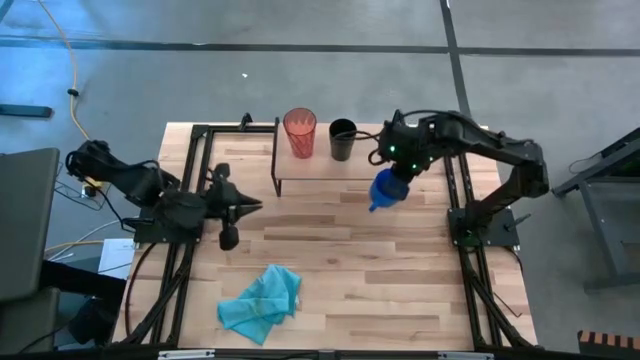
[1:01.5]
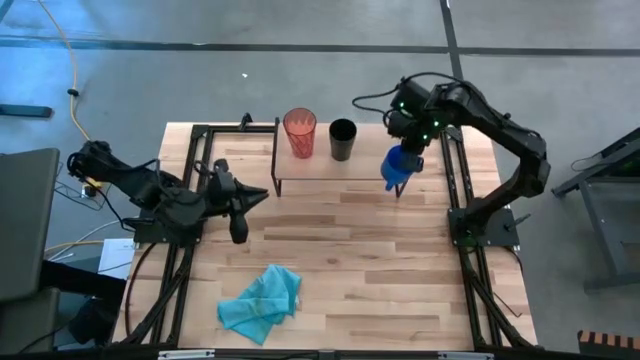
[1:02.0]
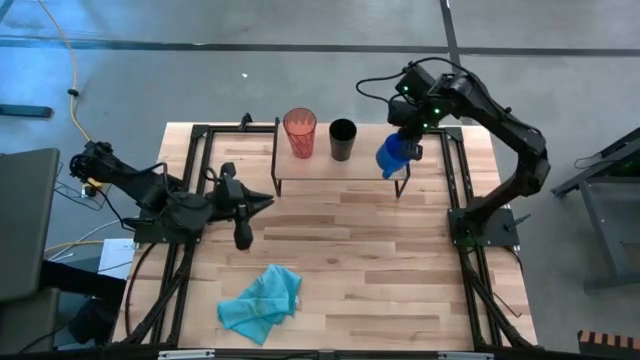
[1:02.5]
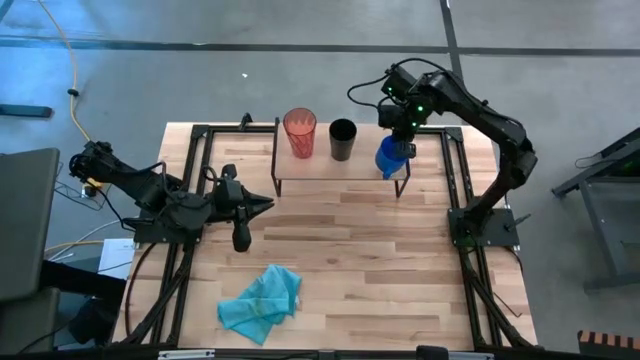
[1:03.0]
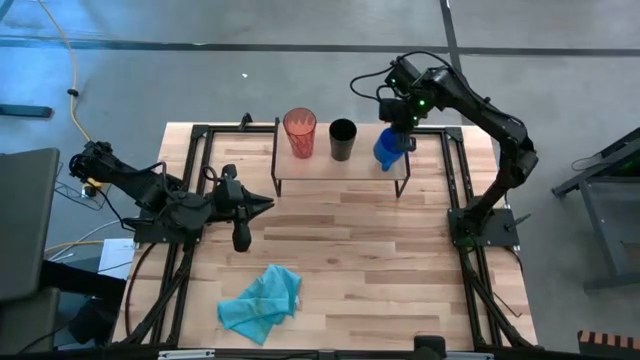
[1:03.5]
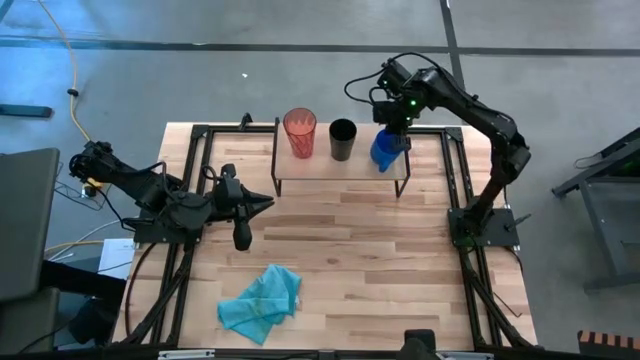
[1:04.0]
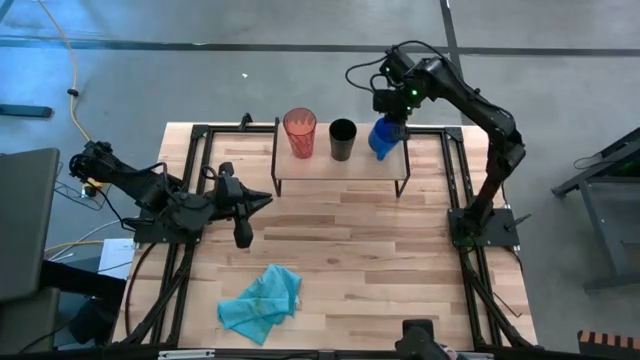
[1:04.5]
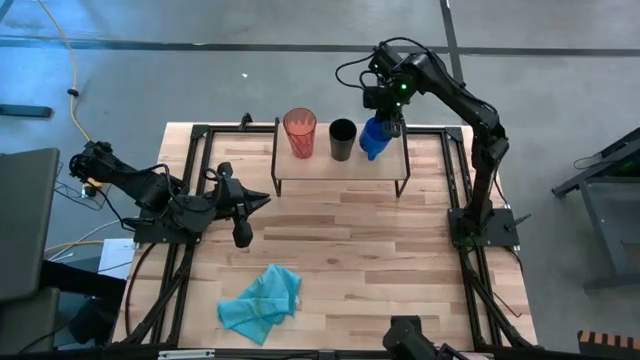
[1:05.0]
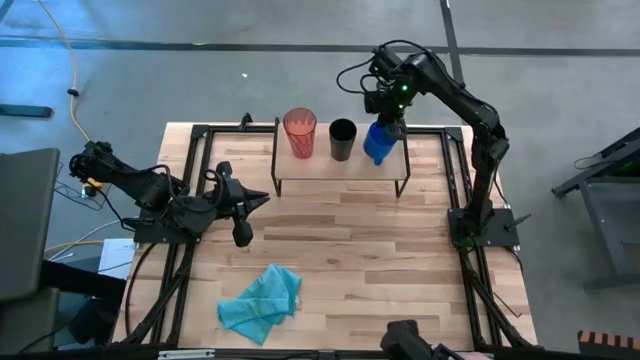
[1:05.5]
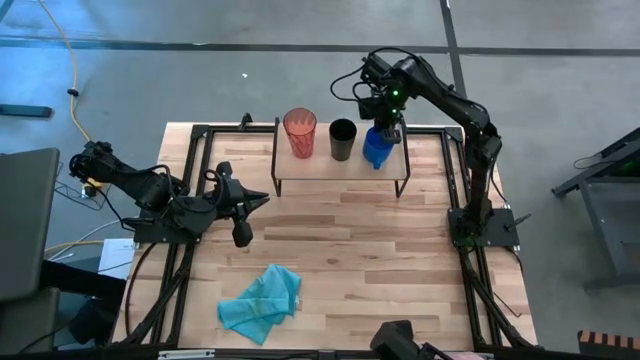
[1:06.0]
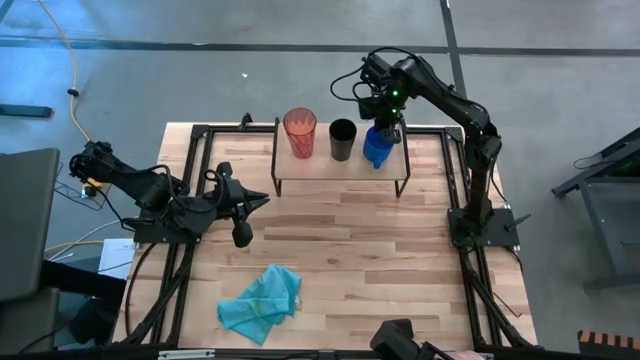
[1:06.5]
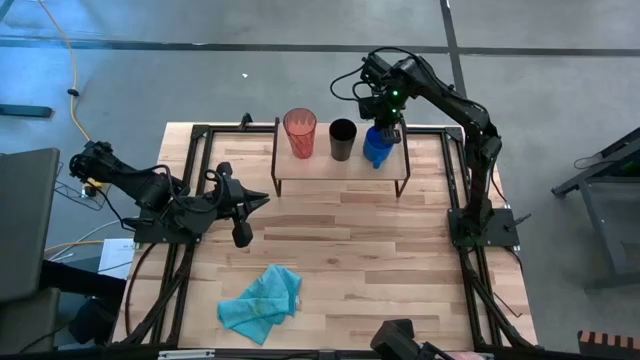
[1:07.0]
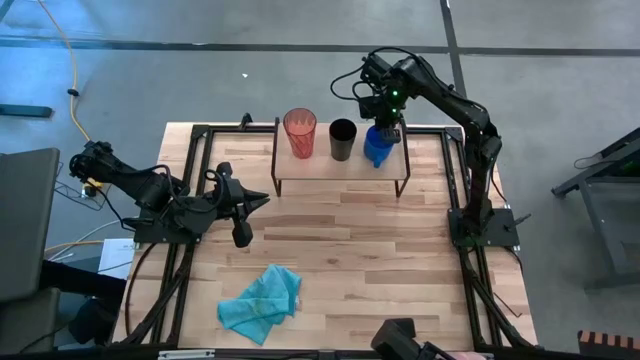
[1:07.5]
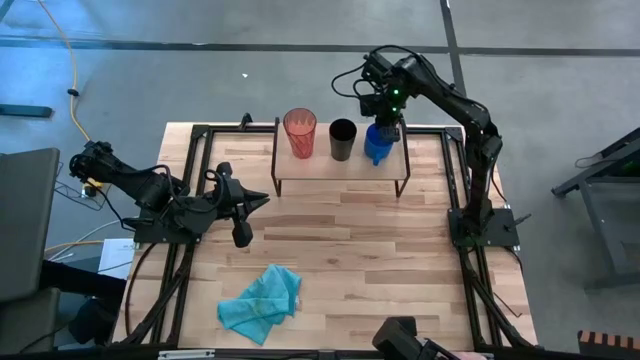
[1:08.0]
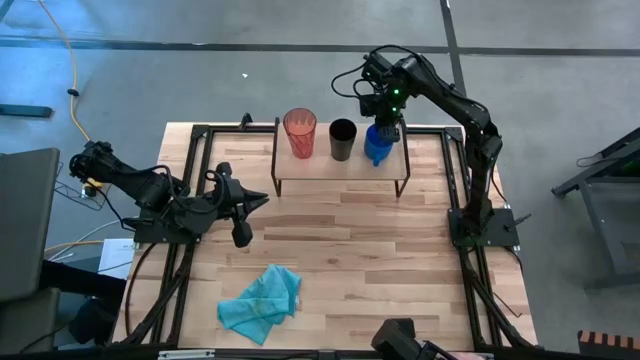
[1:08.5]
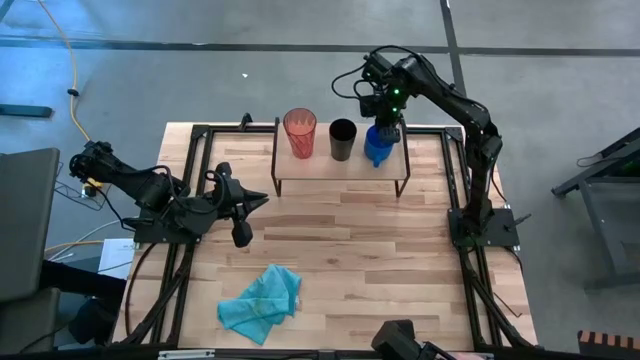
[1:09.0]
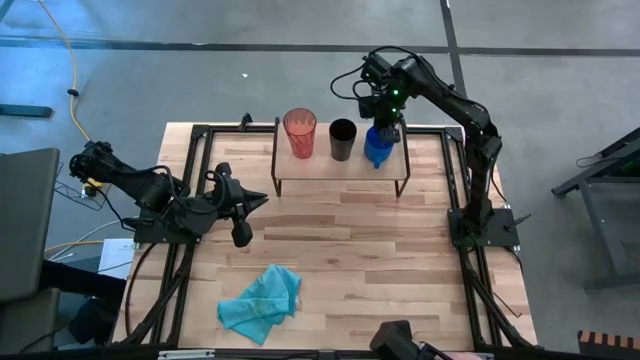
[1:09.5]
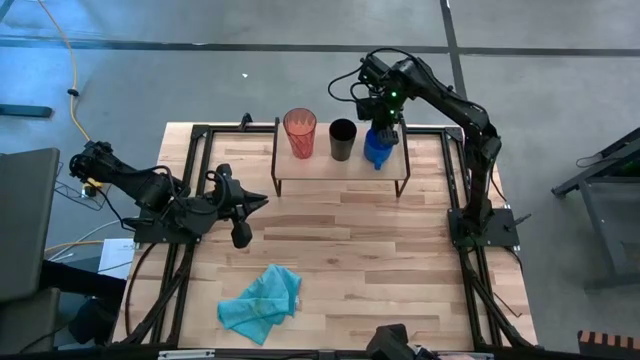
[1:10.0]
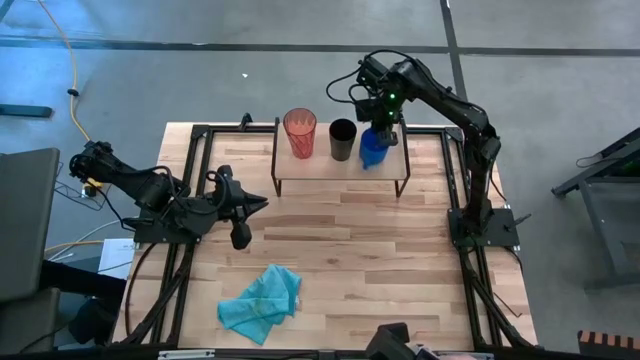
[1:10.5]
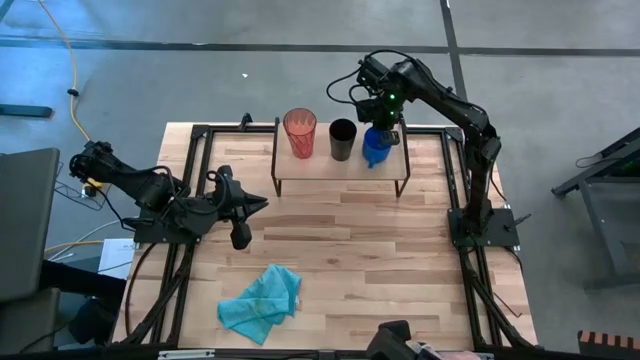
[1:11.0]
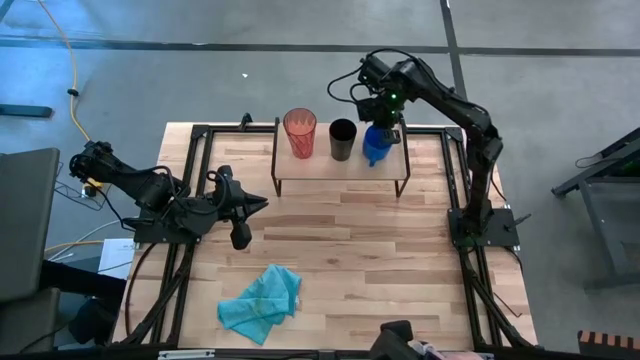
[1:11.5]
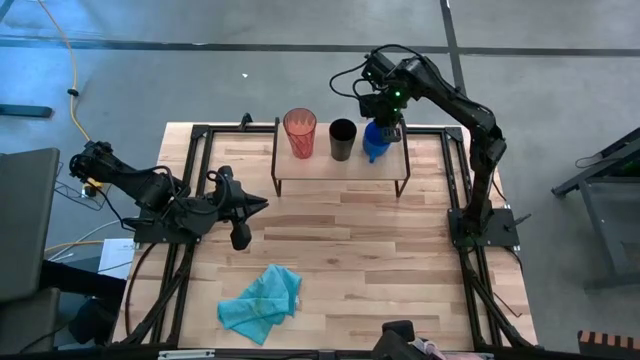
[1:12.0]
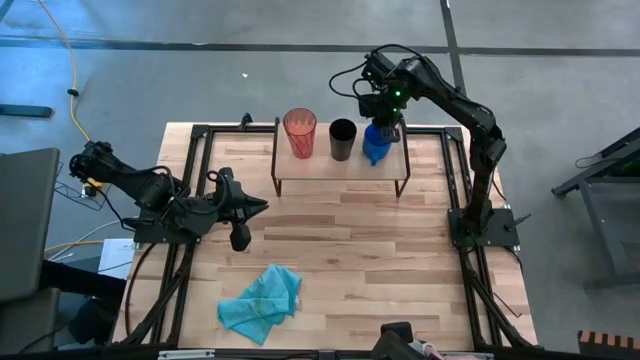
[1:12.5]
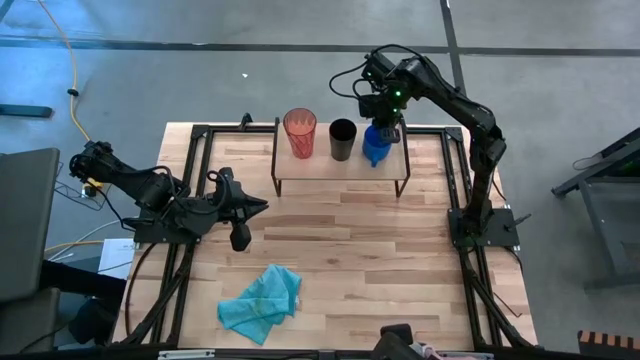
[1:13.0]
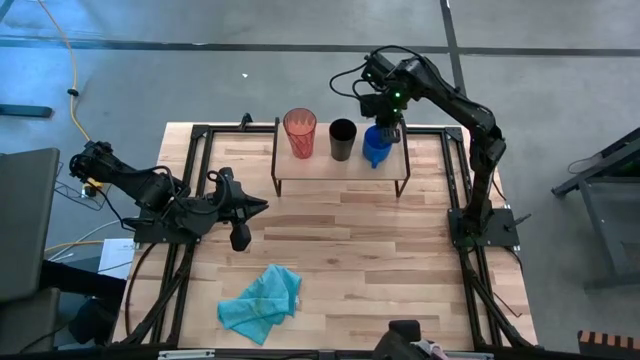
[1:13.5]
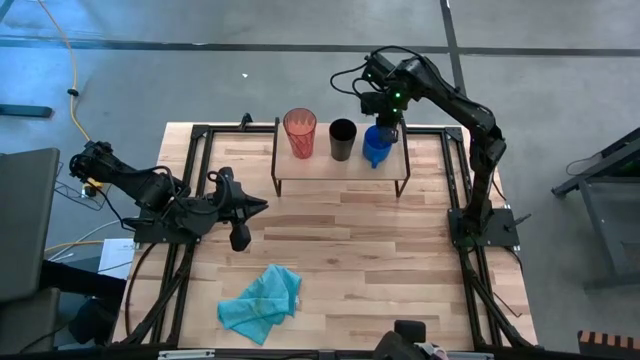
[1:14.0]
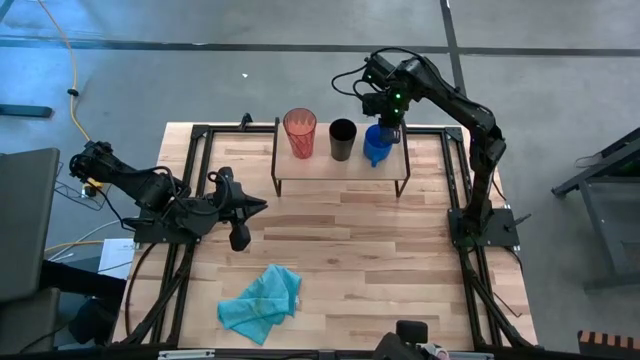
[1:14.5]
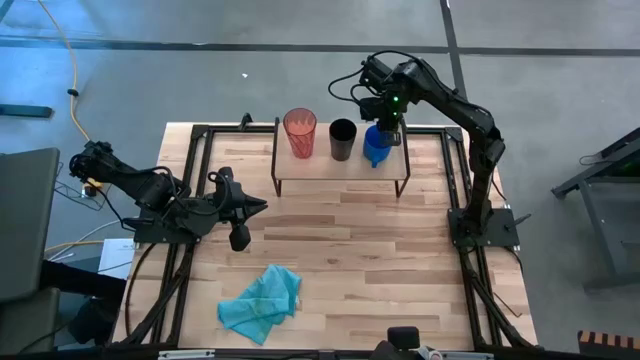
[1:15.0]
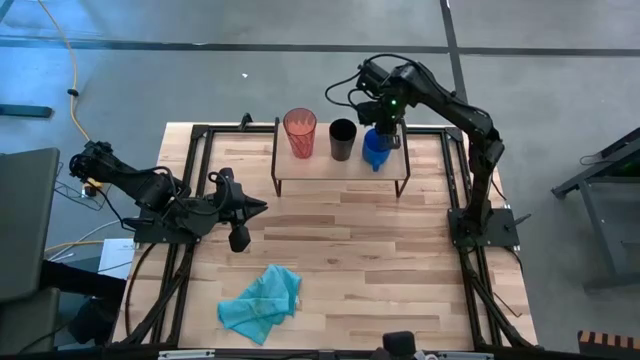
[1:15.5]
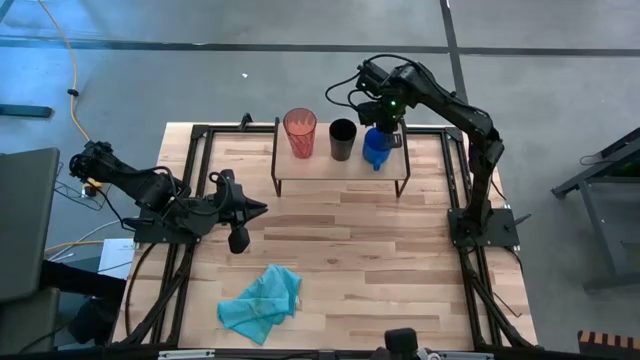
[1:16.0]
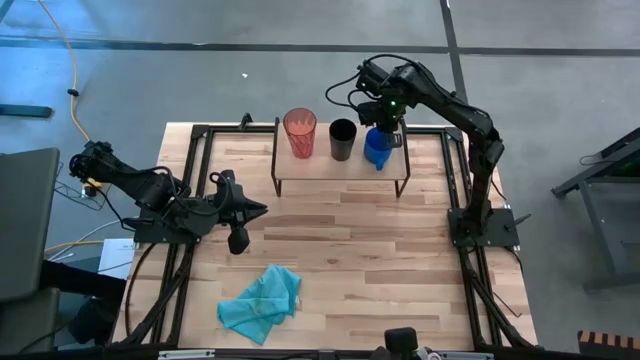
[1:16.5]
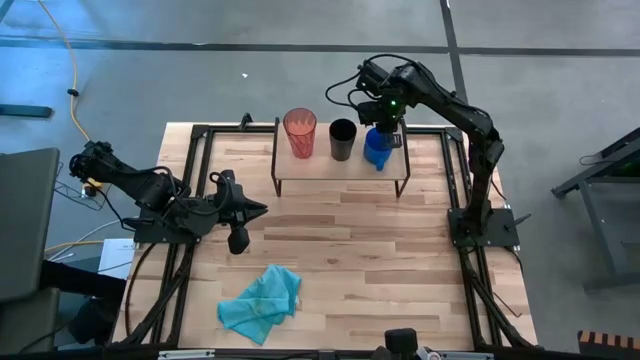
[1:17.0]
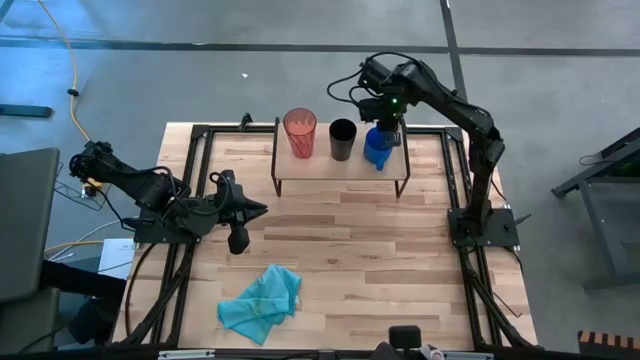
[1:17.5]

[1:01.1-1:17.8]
Task: Stack small to large cups/mugs on shelf
Put the blue mug on the shelf

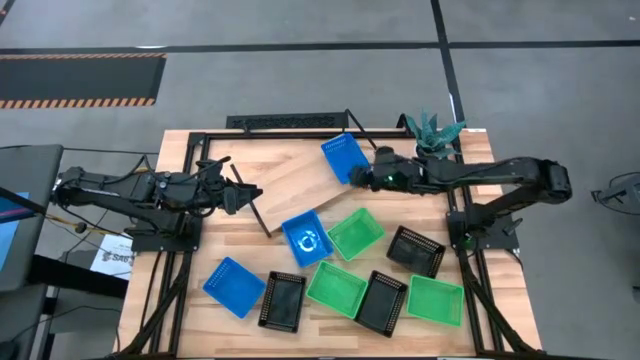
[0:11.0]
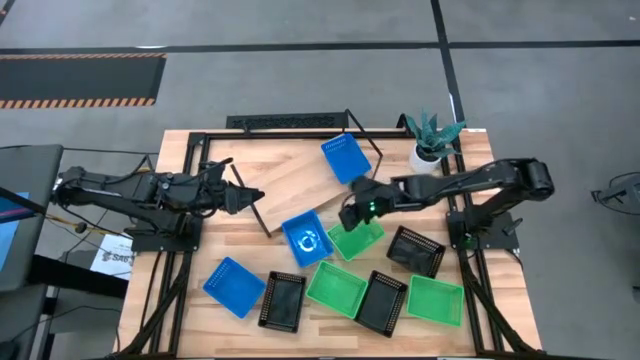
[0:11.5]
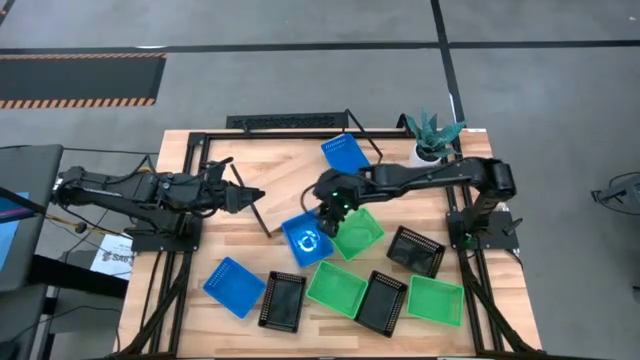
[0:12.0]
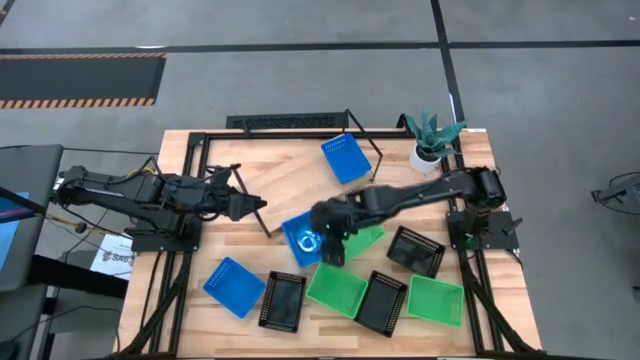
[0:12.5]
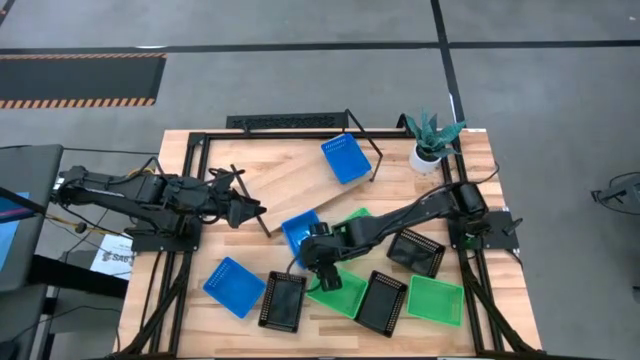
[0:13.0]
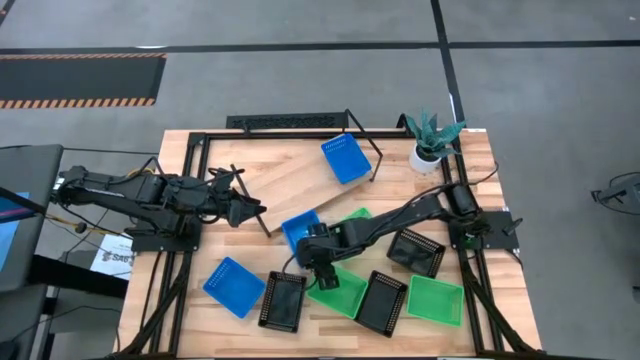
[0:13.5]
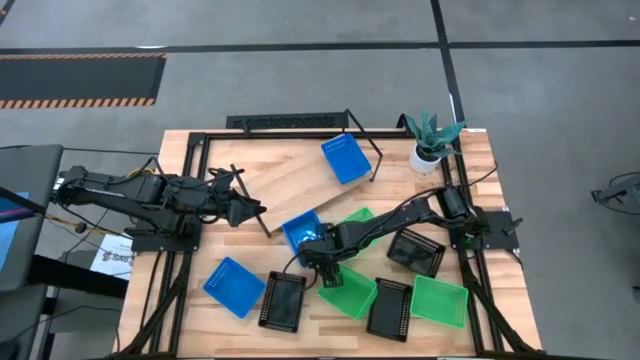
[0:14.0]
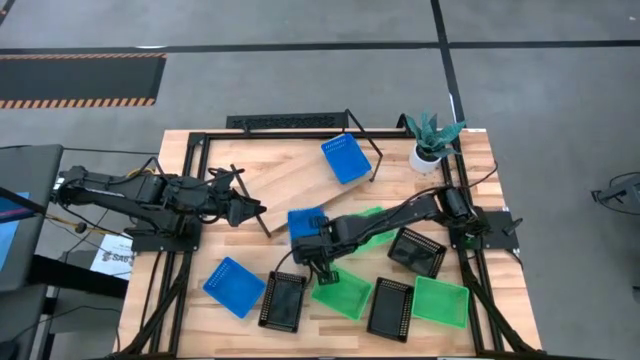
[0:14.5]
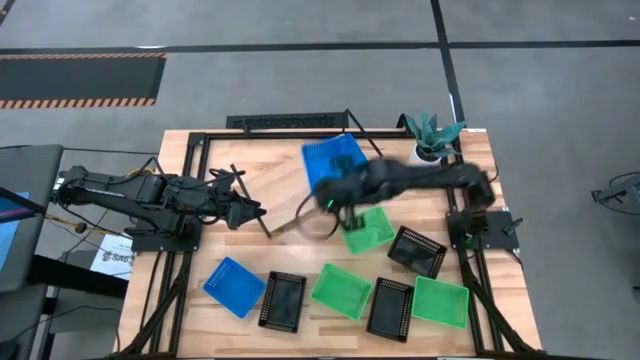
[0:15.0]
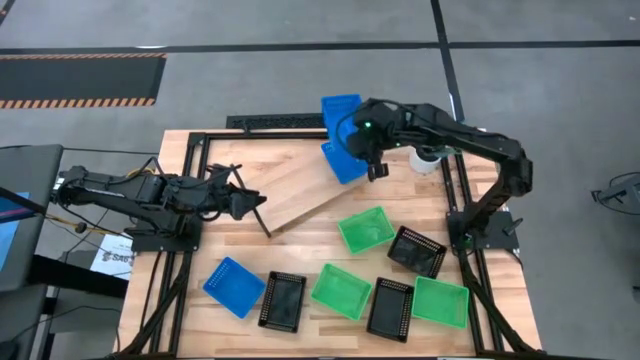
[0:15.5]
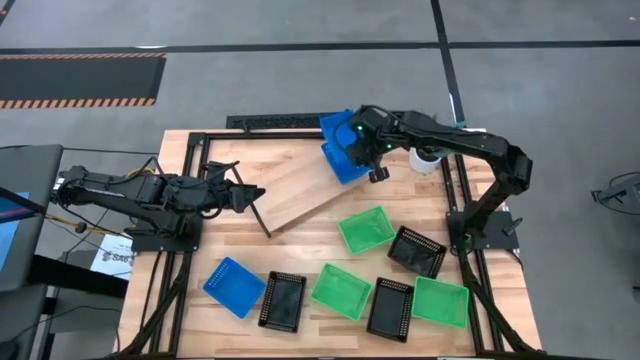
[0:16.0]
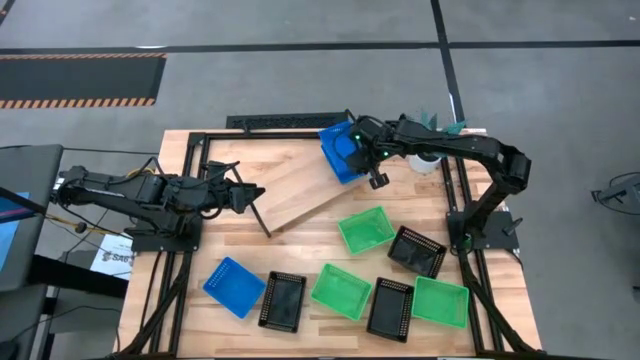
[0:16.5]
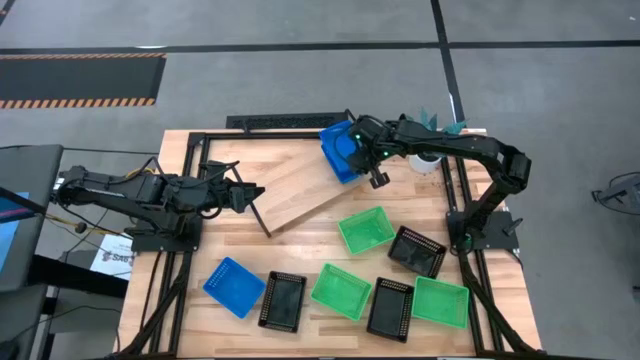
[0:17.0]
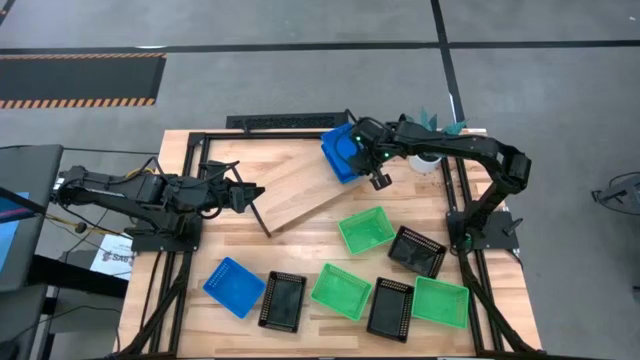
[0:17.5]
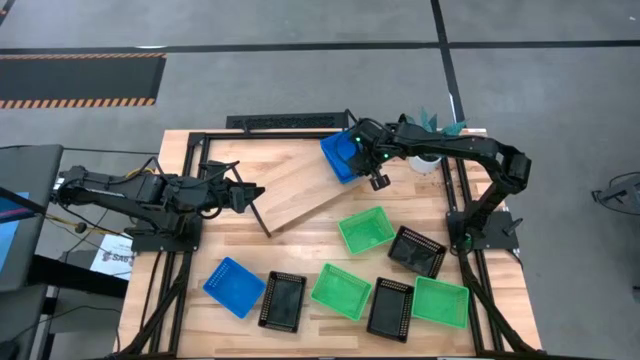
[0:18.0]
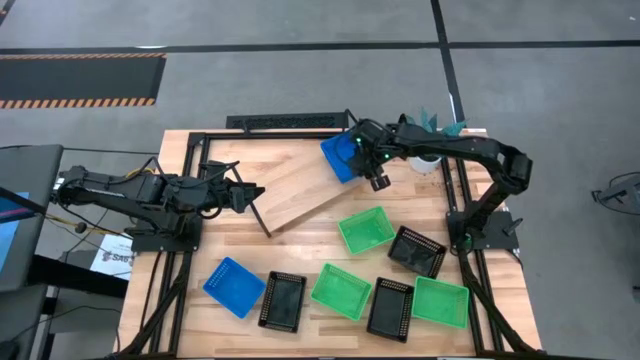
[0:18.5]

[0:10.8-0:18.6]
Task: Stack baskets on shelf by color
Stack the top blue bin on top of the other blue bin on the shelf
